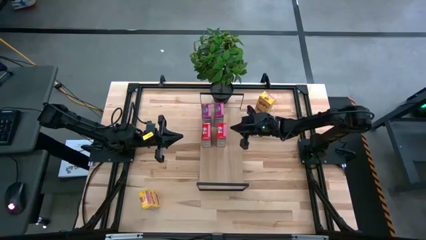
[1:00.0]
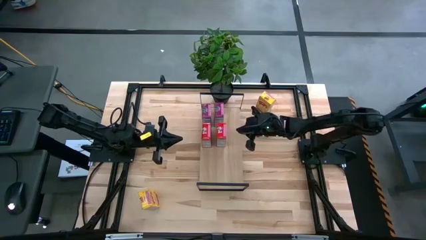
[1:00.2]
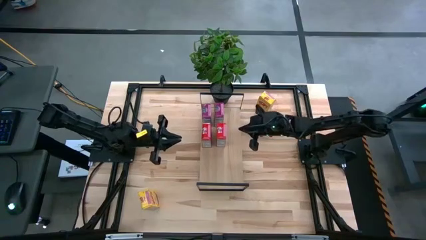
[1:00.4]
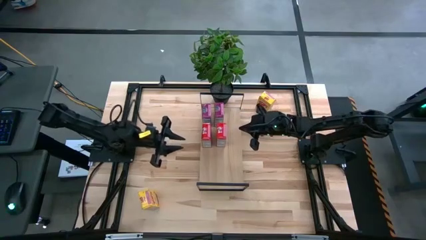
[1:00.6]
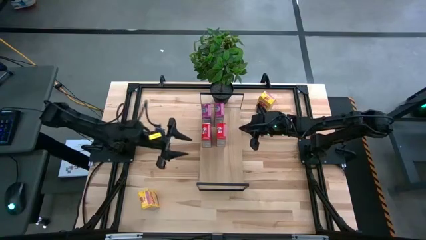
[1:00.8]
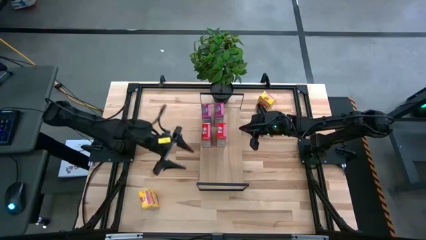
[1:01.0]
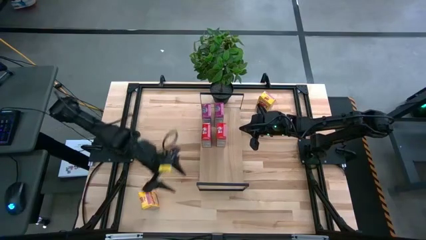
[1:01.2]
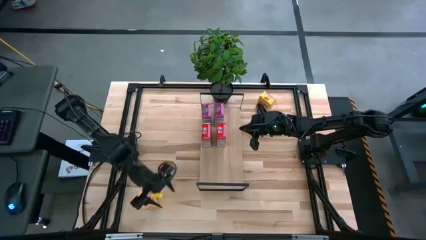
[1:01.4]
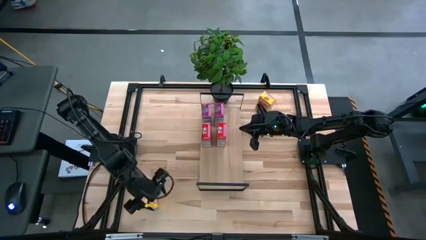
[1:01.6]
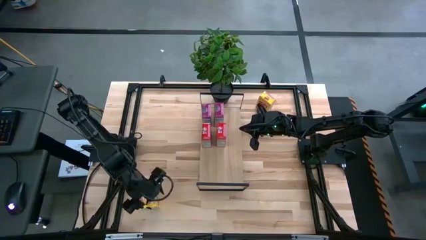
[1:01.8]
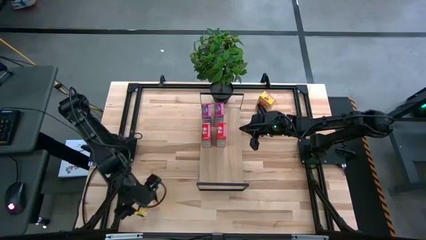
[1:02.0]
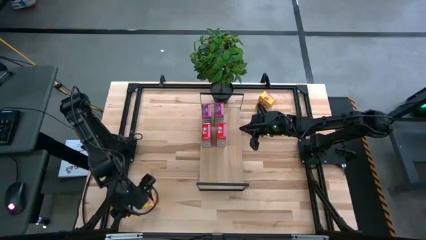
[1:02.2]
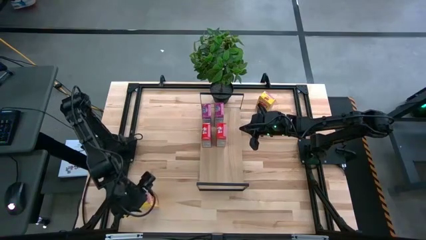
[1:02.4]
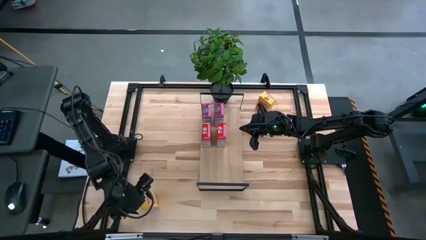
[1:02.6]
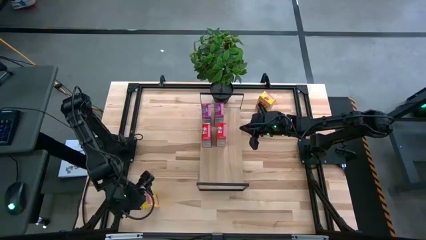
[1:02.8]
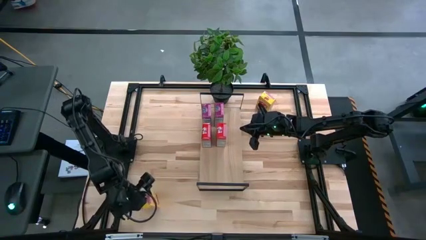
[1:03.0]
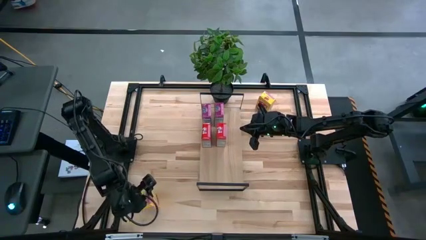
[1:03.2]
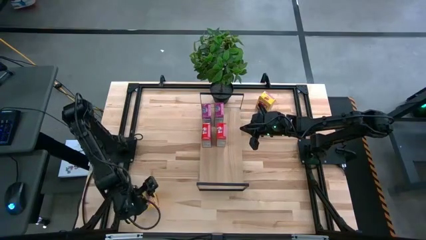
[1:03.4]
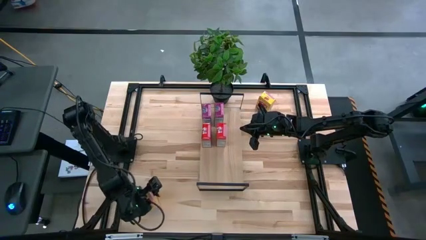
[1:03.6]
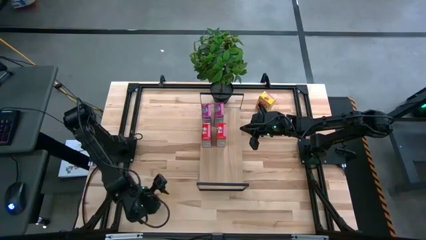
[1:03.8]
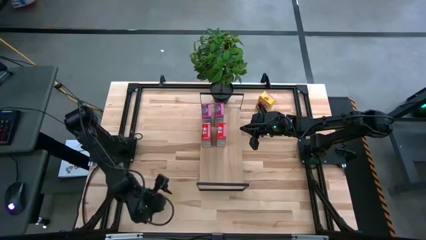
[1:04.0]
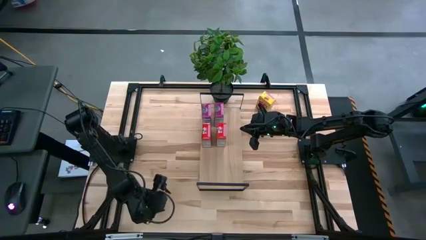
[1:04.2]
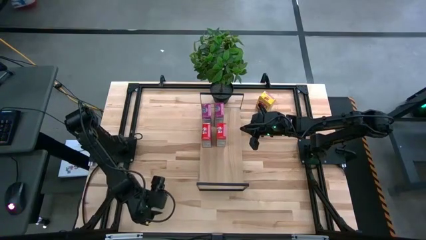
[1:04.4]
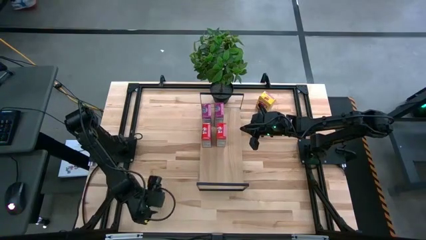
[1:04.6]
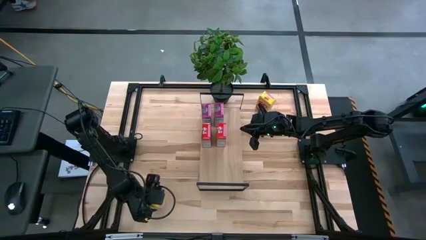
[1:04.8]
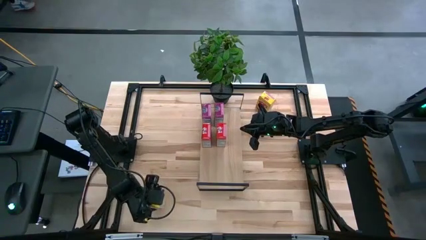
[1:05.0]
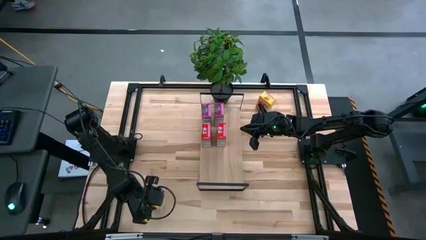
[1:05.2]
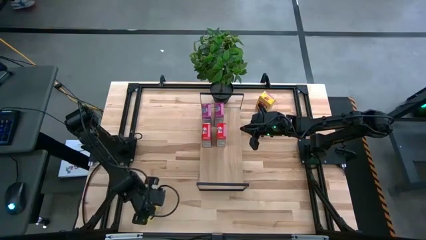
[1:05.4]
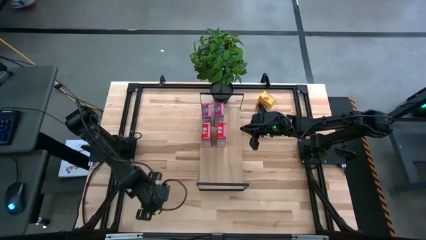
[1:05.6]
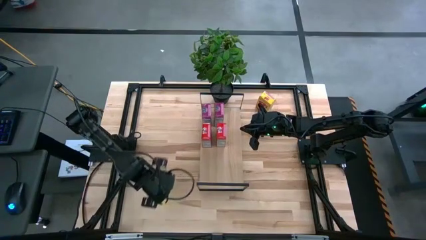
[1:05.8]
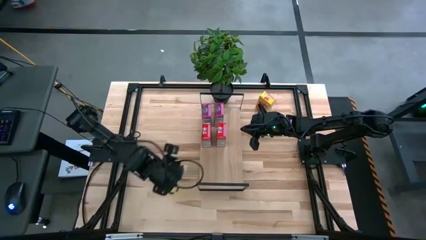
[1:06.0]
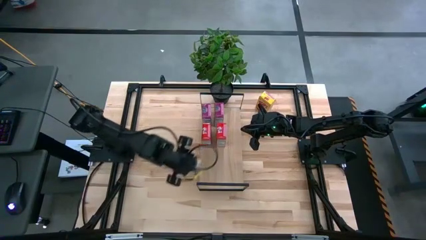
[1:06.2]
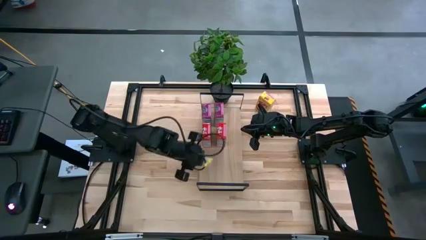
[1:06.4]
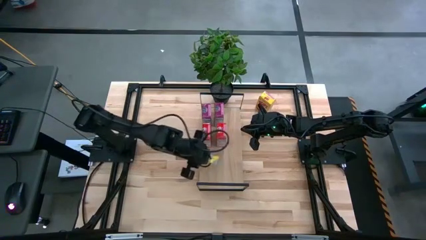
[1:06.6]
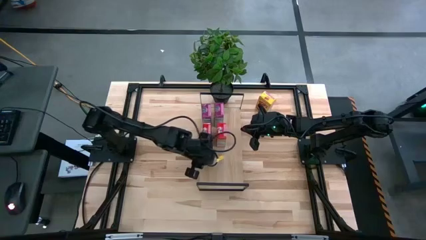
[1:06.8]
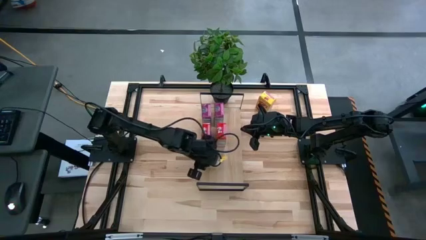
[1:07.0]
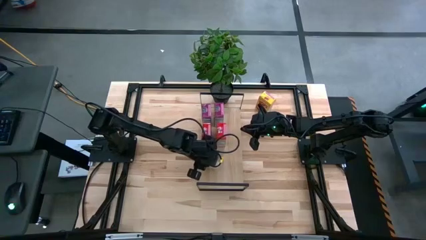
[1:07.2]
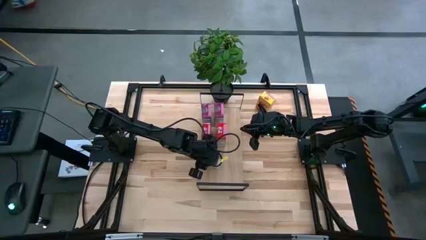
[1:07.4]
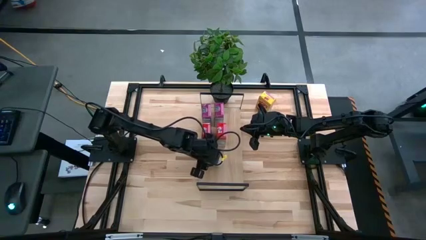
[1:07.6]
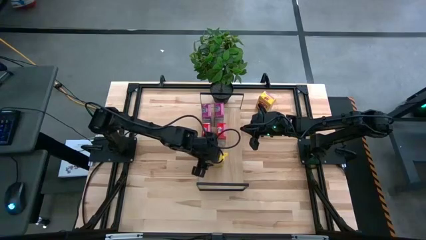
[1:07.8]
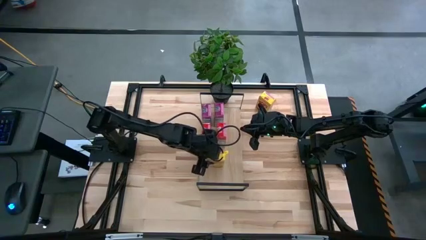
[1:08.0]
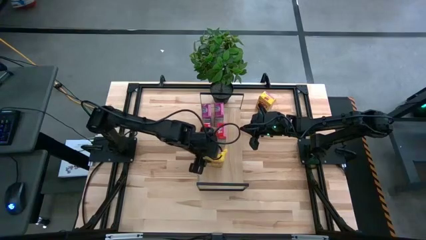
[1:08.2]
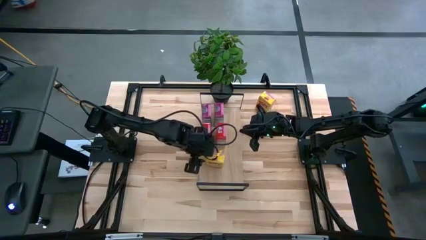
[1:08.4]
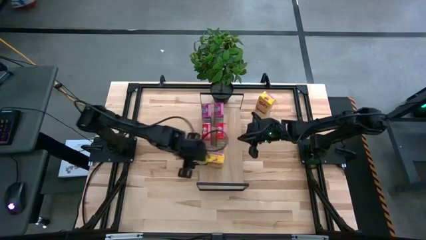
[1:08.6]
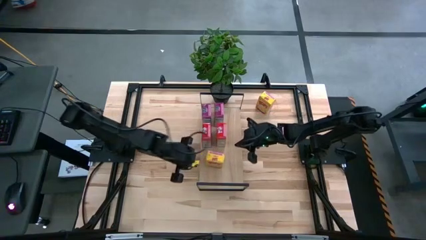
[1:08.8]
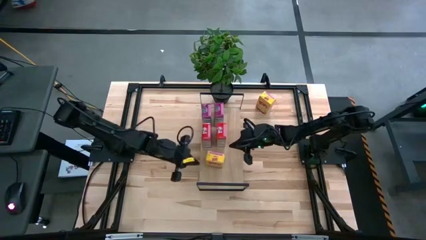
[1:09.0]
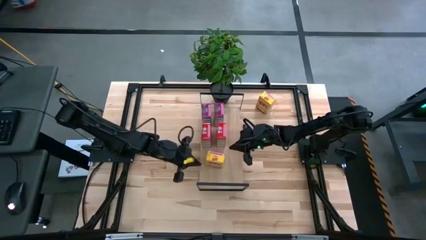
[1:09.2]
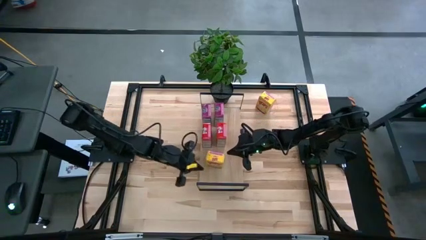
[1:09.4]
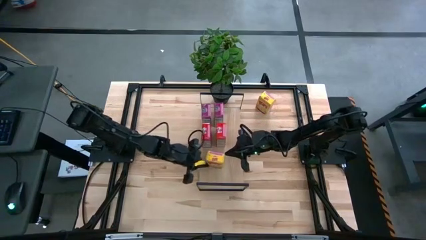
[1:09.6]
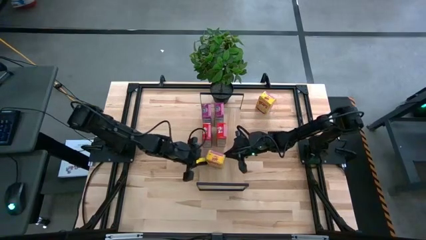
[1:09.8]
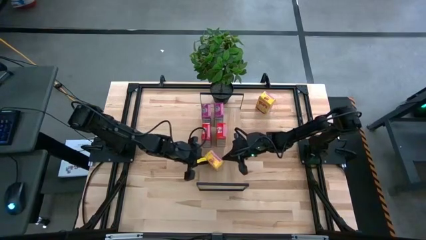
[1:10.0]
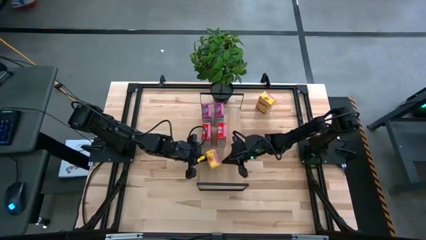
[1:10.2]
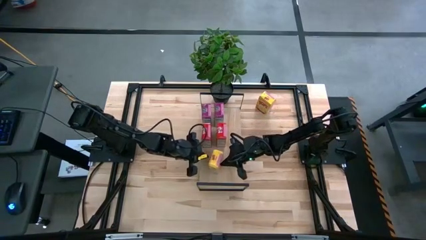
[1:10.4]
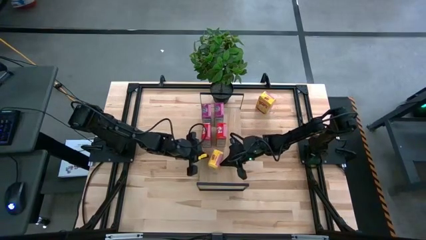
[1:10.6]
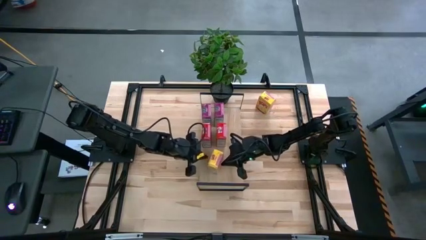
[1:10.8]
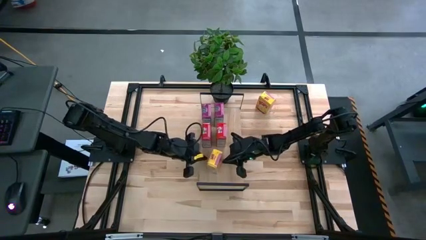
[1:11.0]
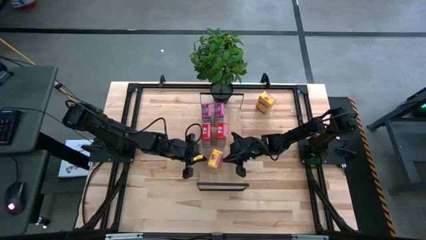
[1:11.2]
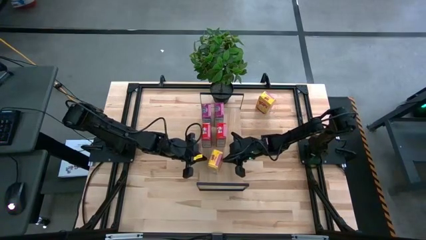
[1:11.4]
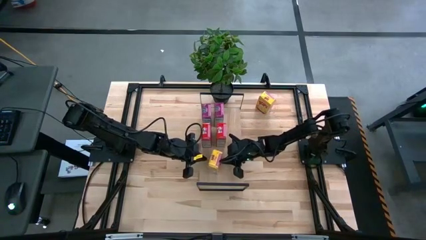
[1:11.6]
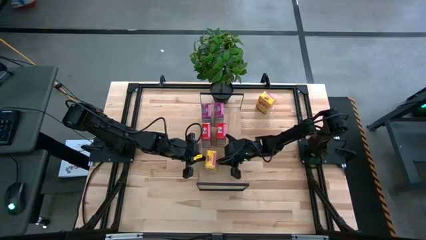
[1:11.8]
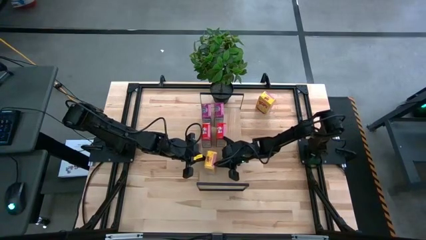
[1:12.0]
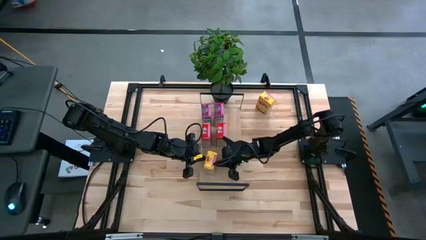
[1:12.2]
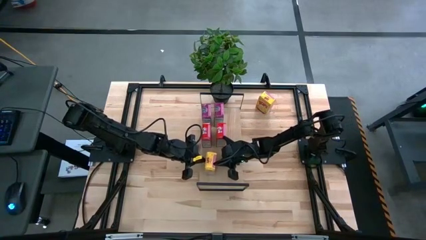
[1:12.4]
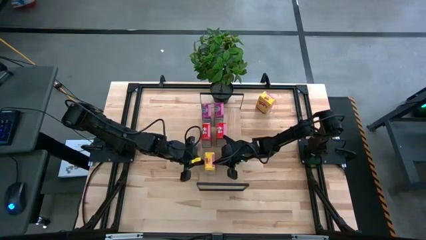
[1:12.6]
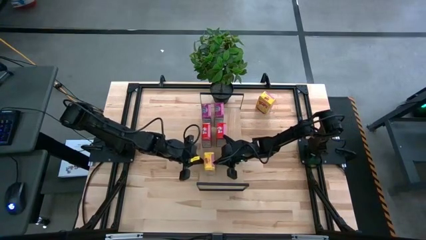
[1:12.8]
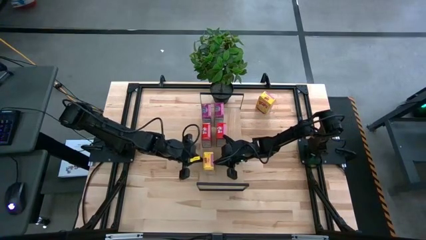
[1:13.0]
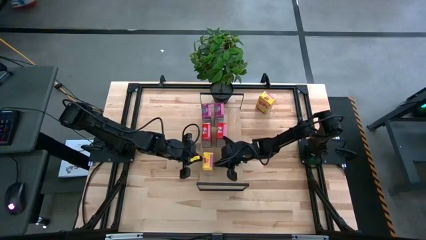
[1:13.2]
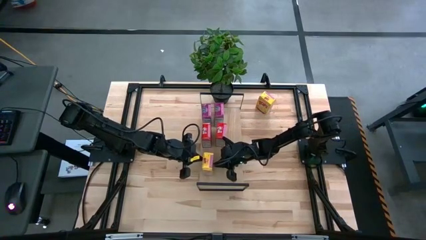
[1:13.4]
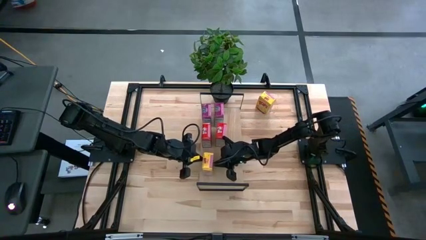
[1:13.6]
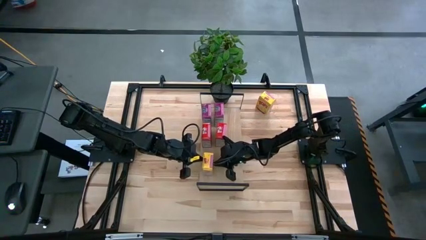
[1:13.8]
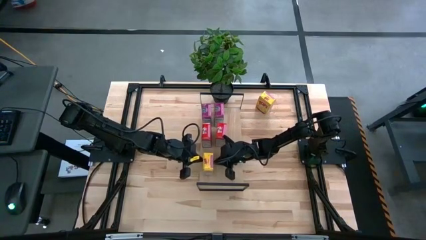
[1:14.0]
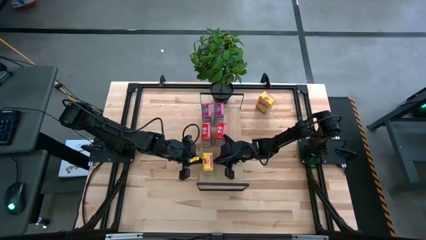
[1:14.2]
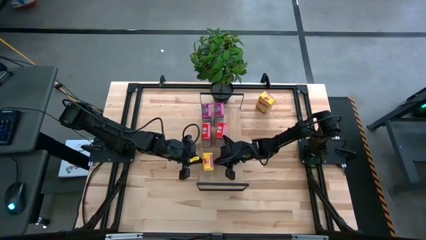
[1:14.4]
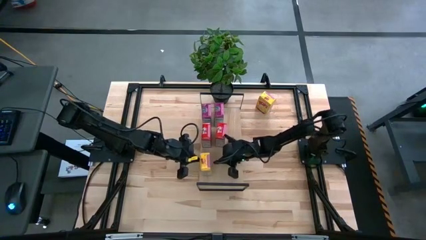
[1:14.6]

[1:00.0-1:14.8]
Task: Stack cereal on shelf
Put the left yellow cereal box on the shelf

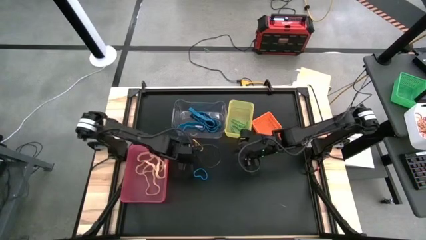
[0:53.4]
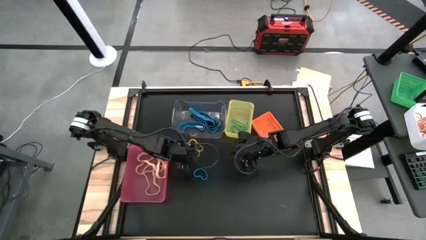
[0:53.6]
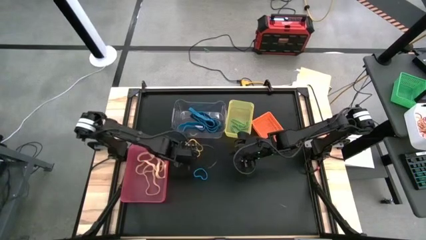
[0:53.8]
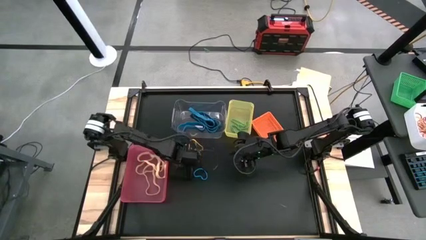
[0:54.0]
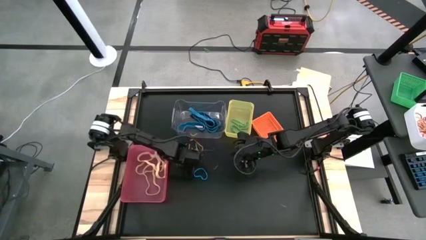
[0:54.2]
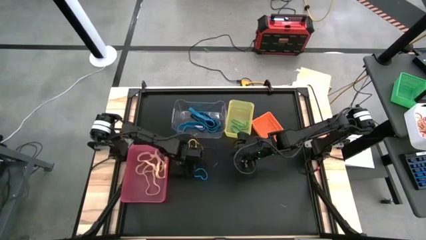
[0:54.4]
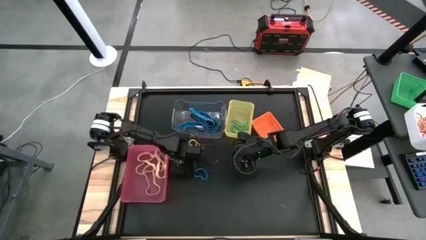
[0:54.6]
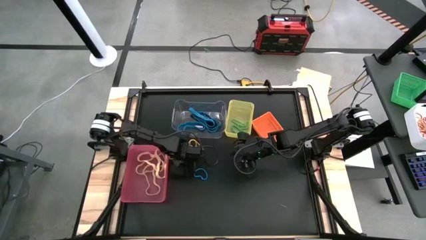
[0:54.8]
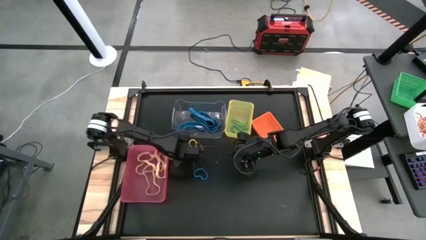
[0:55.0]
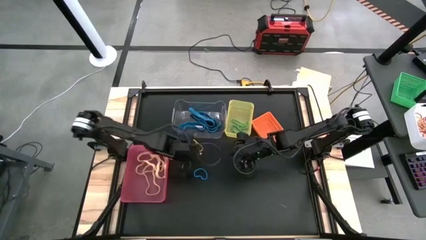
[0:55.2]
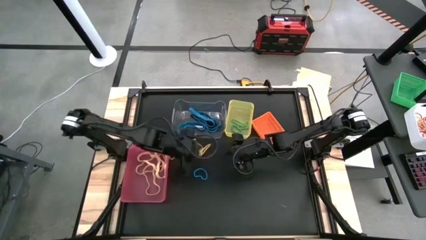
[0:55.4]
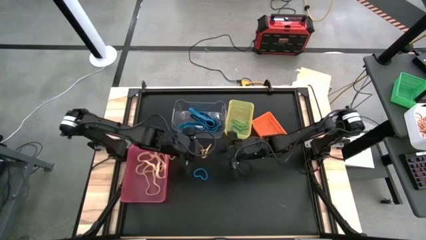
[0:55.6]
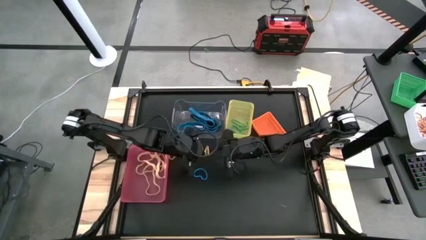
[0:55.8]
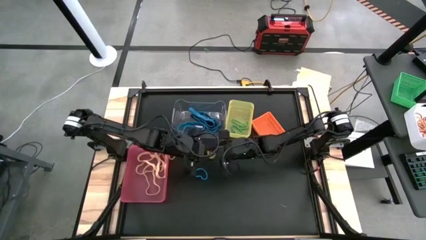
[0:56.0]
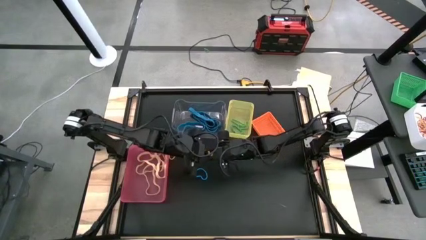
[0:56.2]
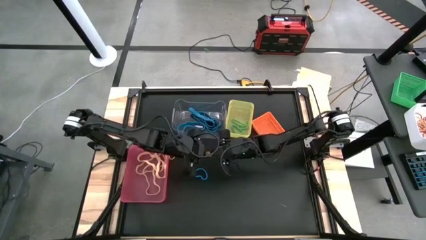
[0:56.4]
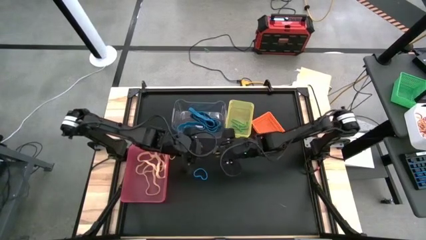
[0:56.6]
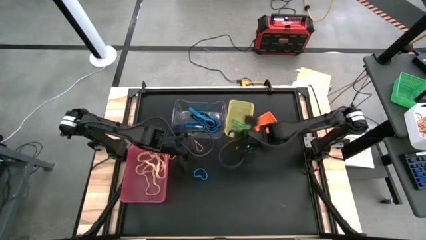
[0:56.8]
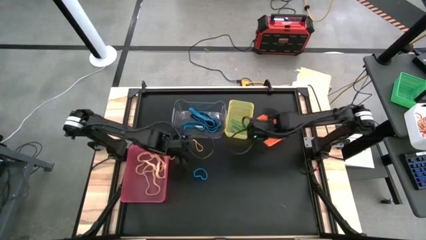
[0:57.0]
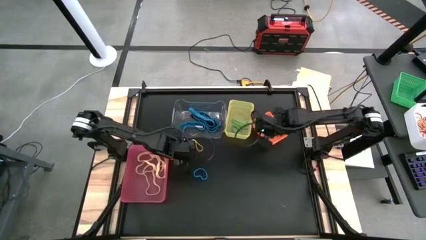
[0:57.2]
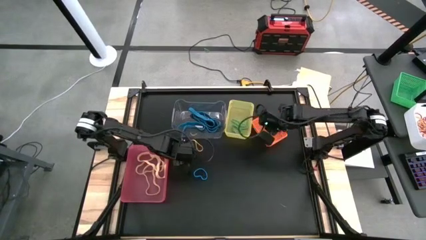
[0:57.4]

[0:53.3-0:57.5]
Task: Sort rubber bands into baskets
Put the yellow rubber band into the orange bin
